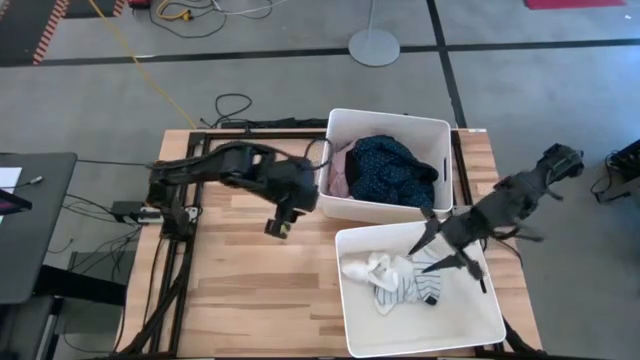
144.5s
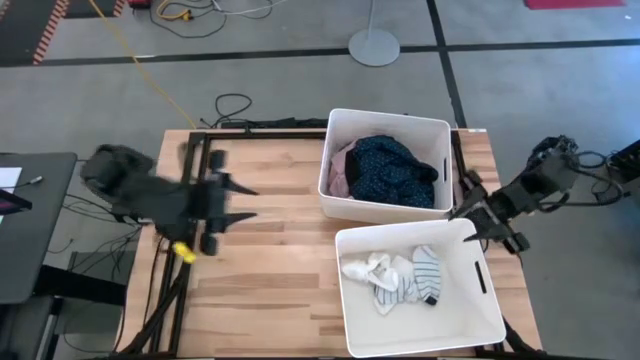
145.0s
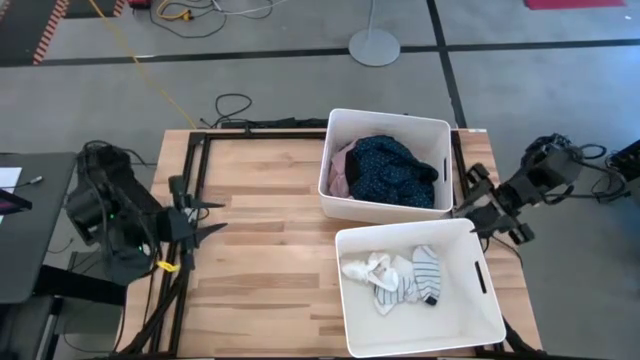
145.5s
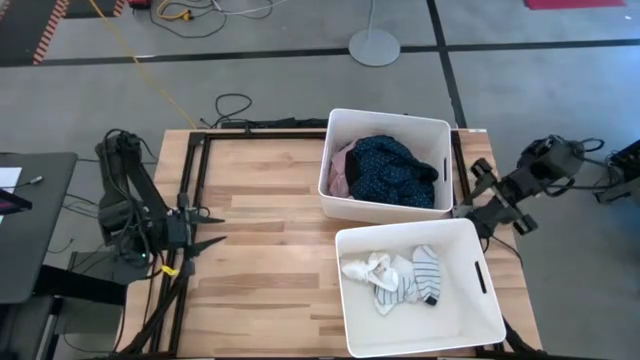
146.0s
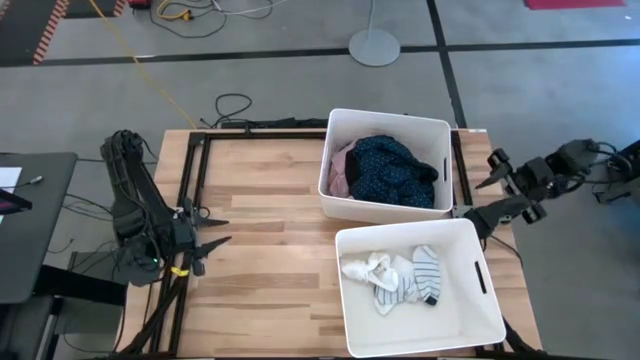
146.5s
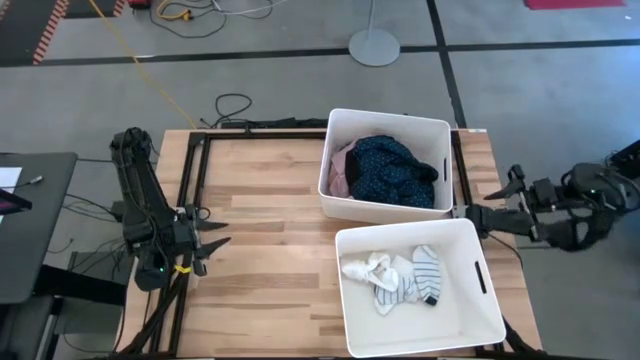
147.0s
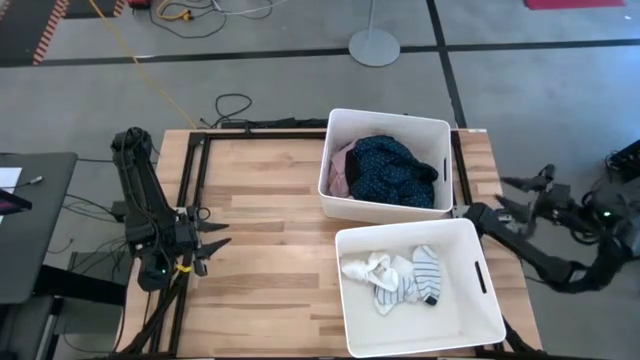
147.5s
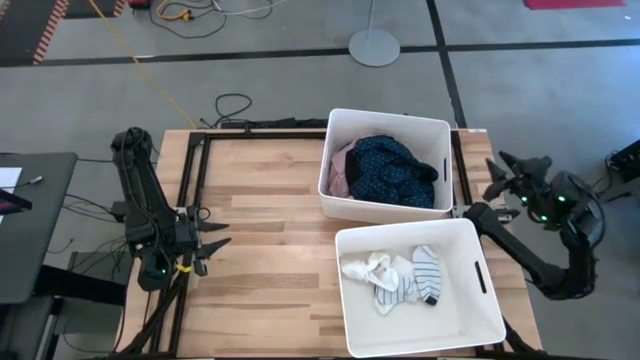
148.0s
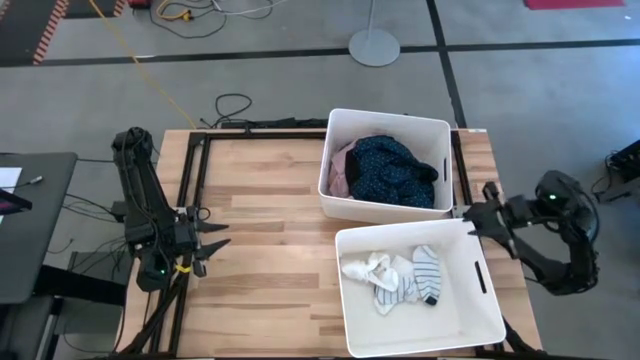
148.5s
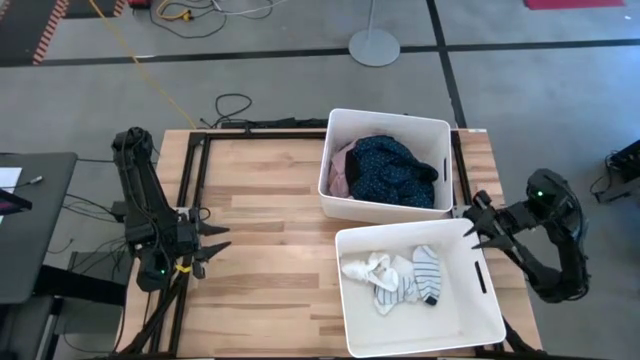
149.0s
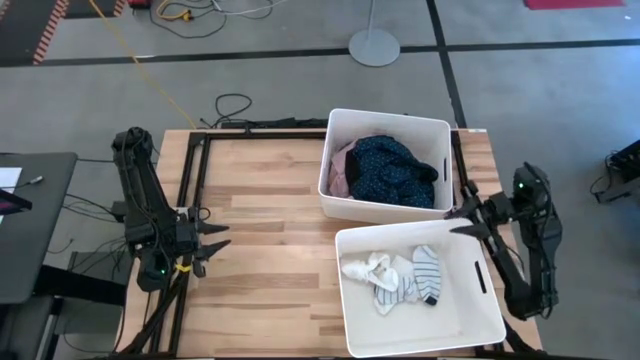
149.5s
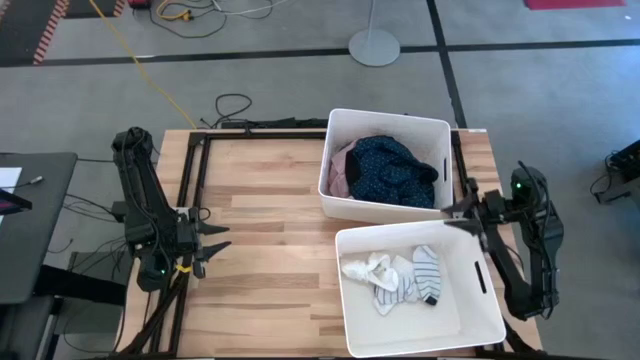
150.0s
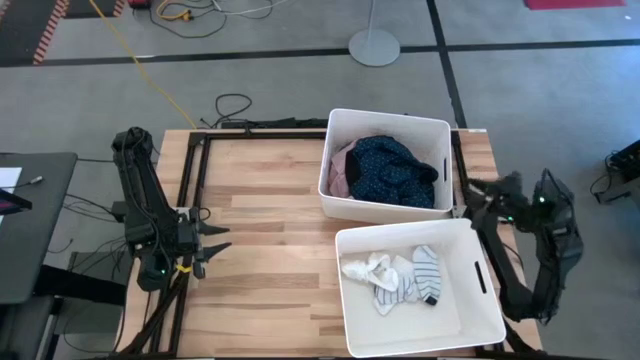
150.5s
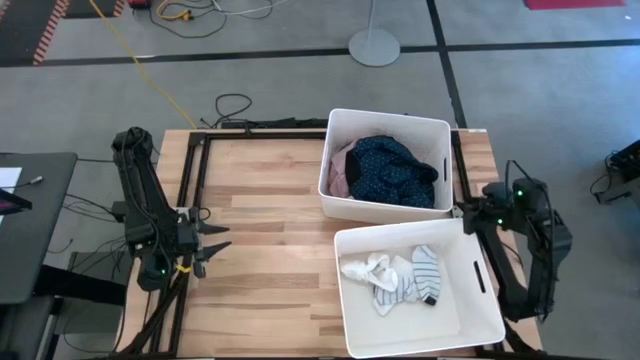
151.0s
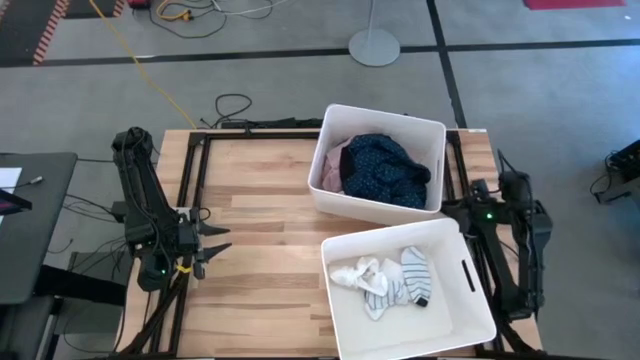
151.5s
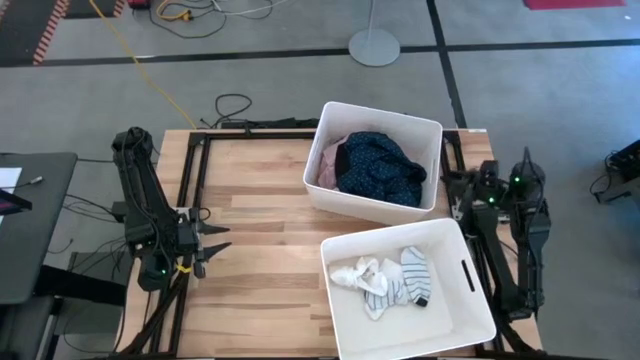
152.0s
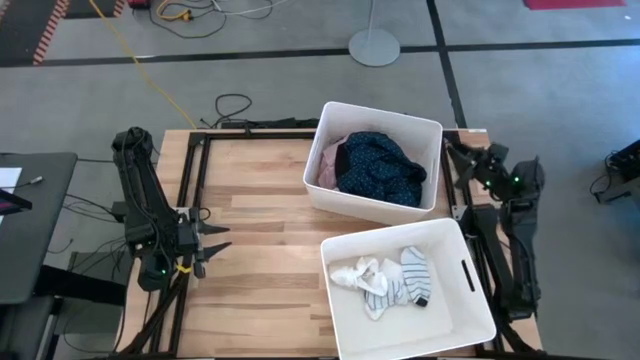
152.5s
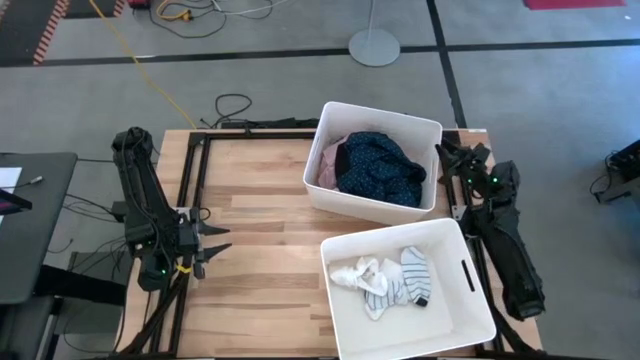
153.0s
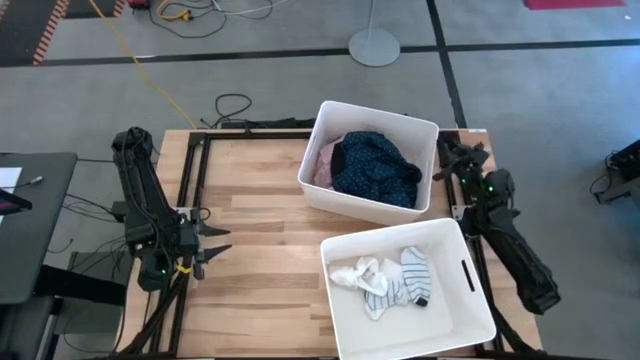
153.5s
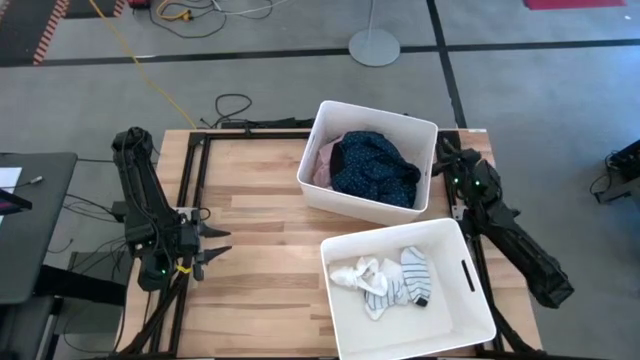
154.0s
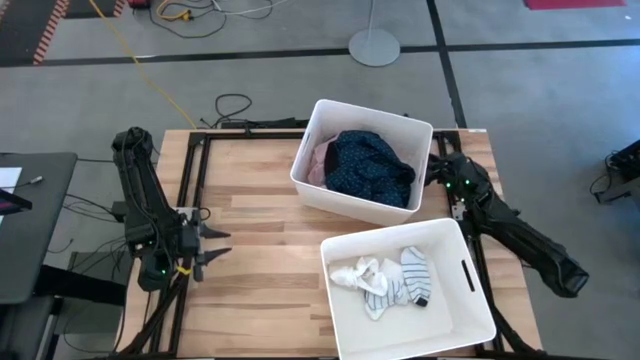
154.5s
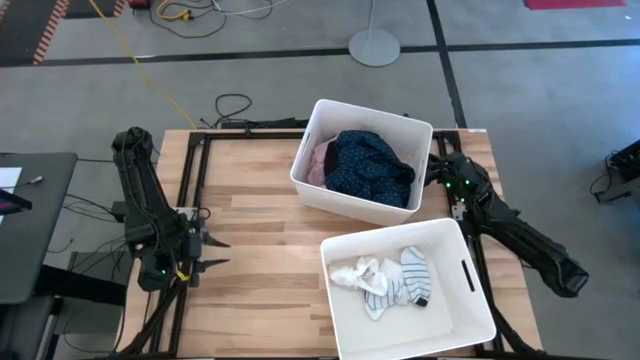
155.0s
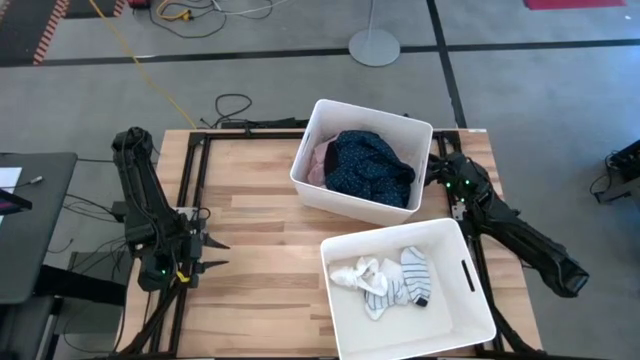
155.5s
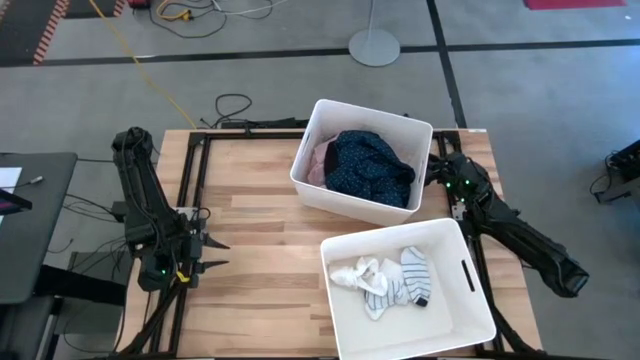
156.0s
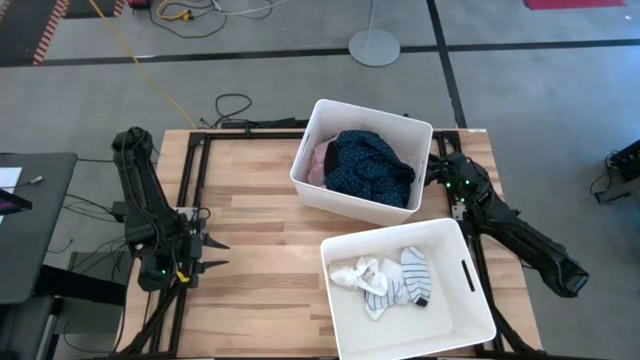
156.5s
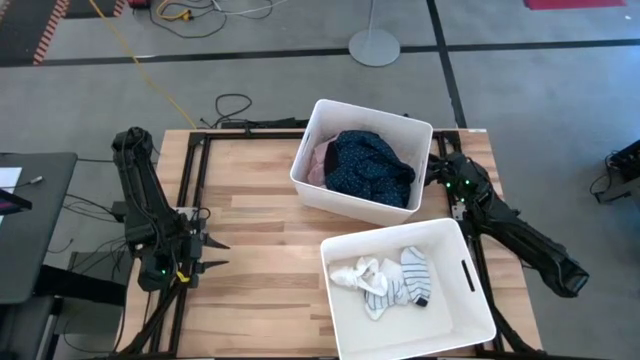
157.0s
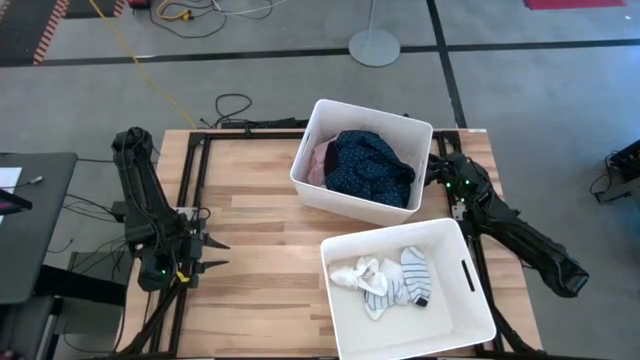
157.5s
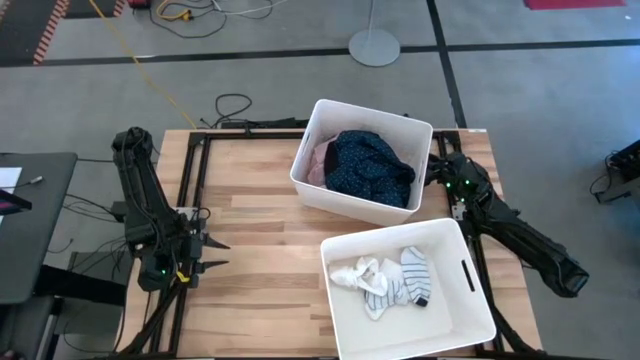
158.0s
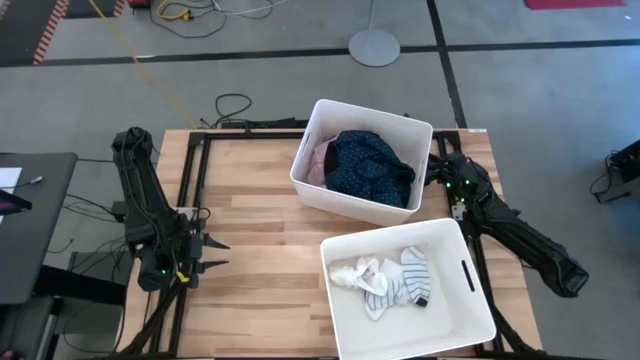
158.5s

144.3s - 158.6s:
Task: Sort clothes
Return to home position

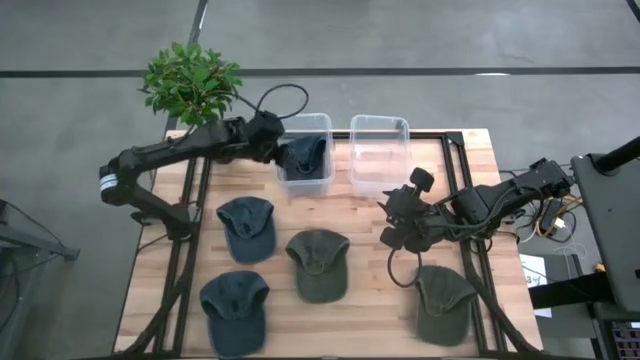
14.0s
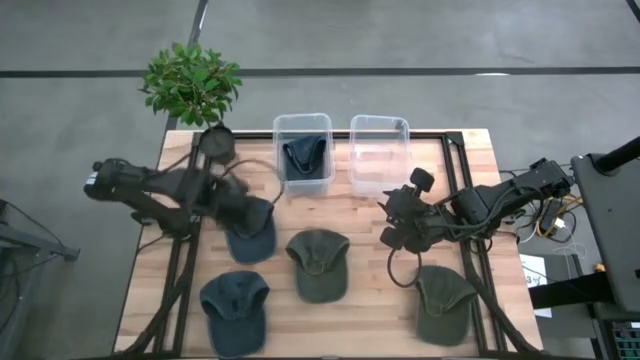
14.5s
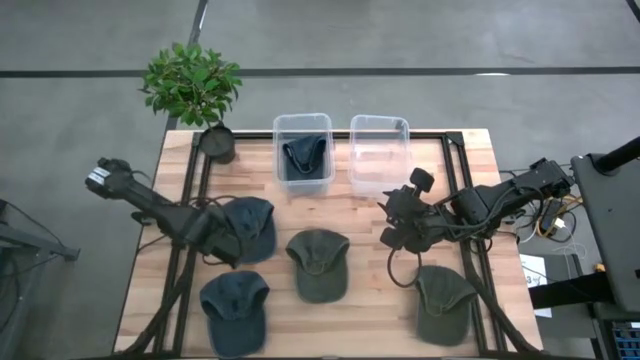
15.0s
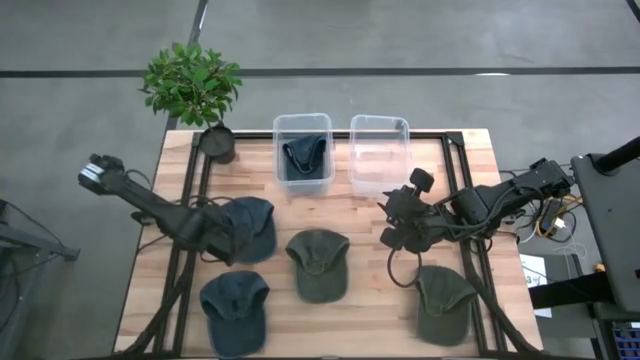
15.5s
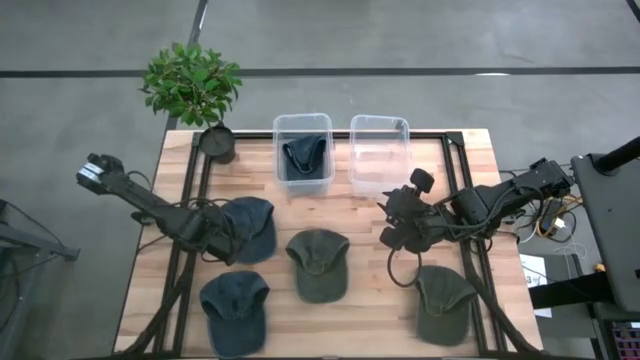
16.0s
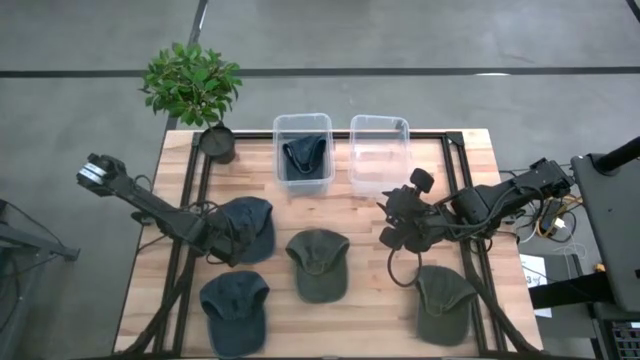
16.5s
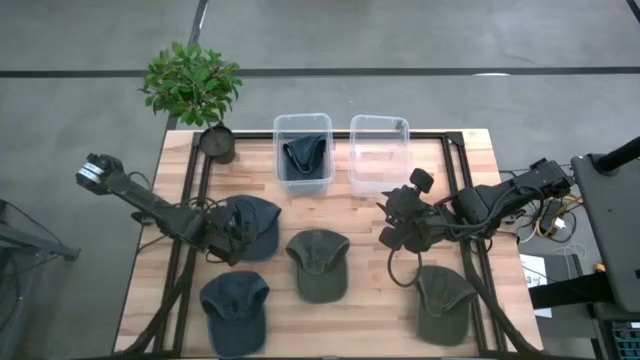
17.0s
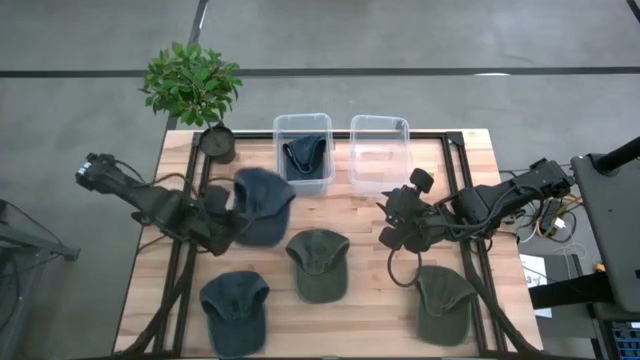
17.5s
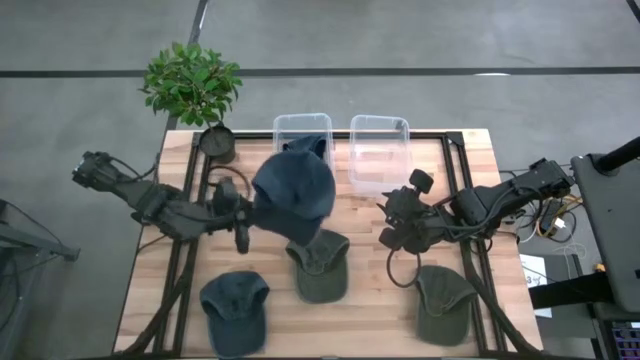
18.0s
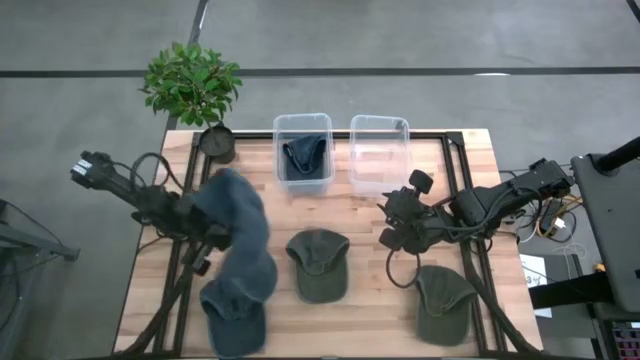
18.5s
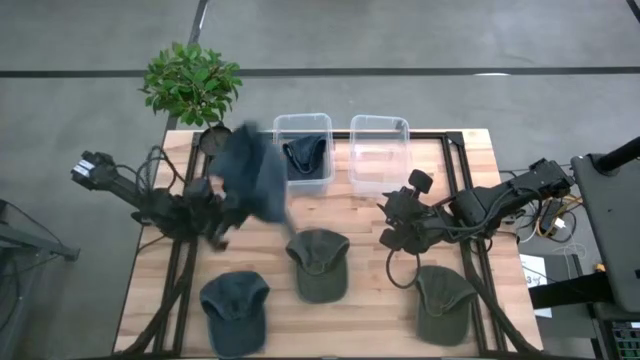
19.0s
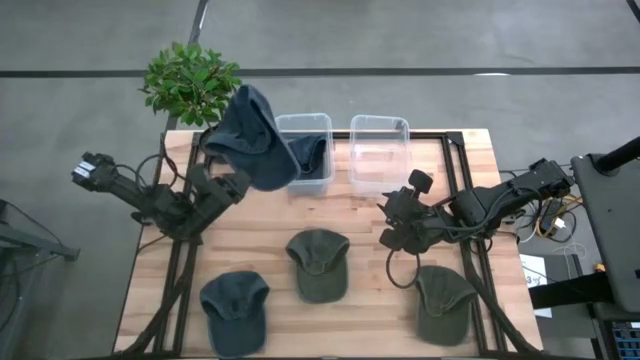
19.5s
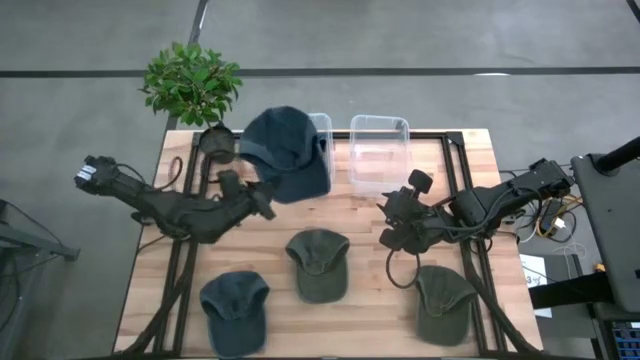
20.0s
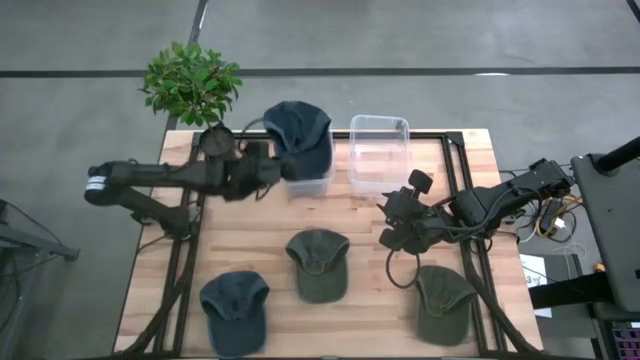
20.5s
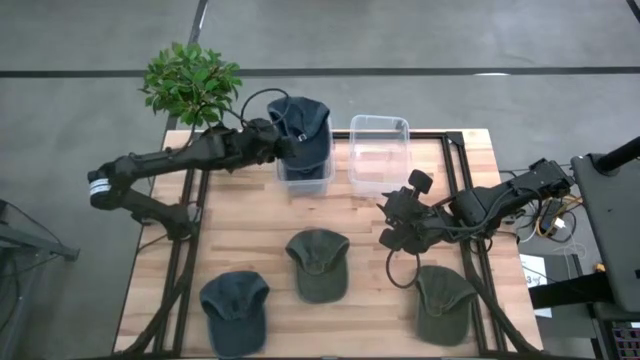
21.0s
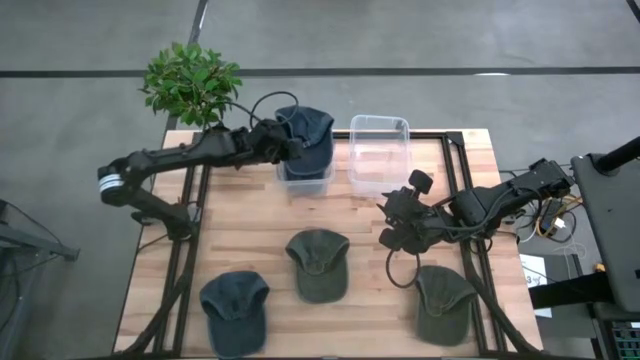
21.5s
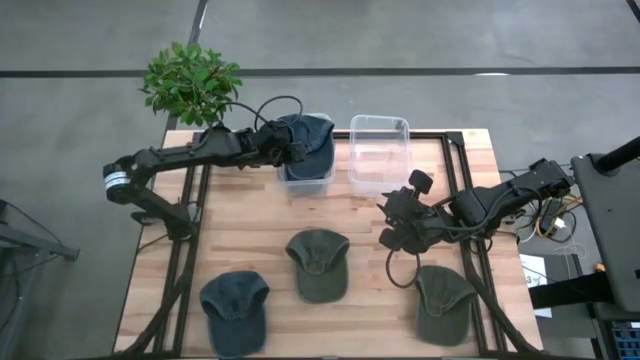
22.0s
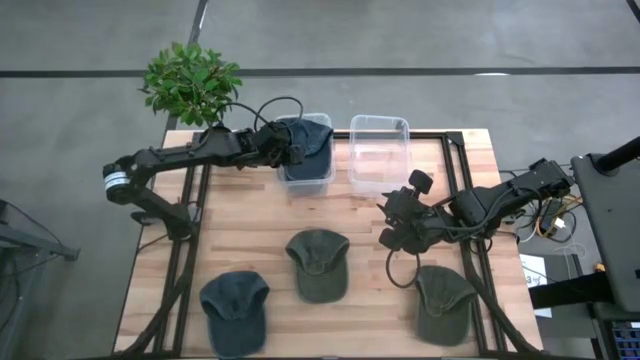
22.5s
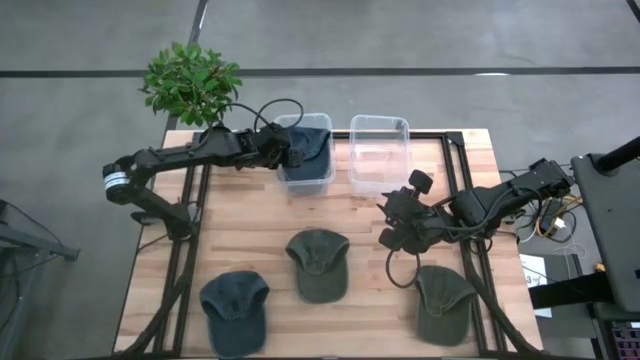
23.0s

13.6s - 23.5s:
Task: Pick & Place hat
Put the top left blue cap into the left transparent bin
